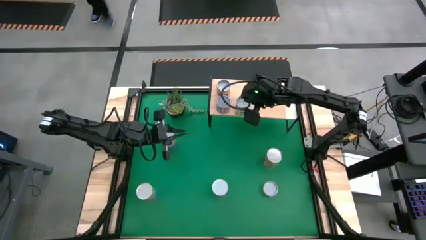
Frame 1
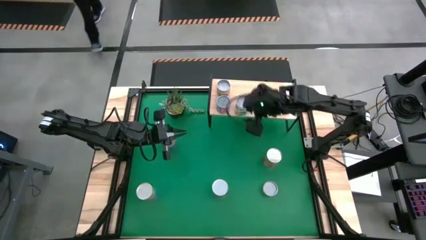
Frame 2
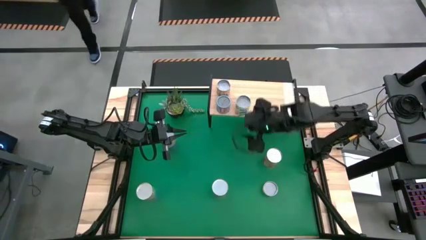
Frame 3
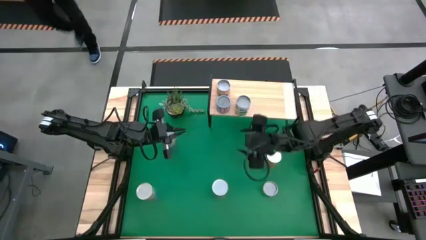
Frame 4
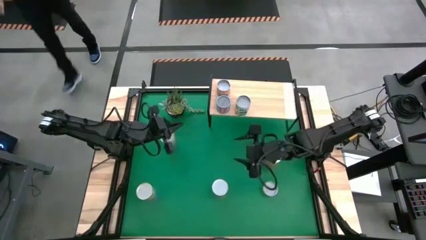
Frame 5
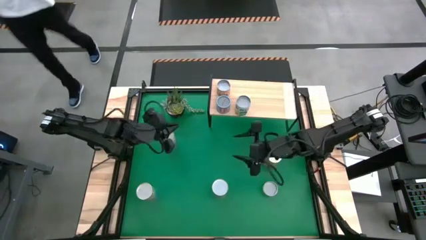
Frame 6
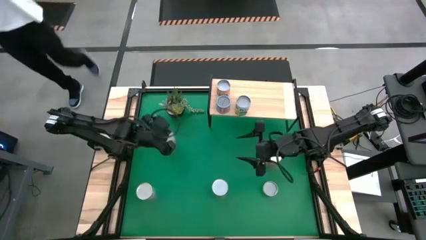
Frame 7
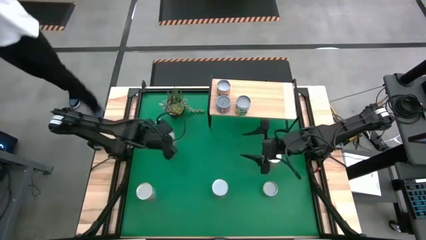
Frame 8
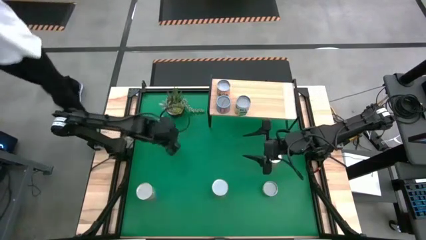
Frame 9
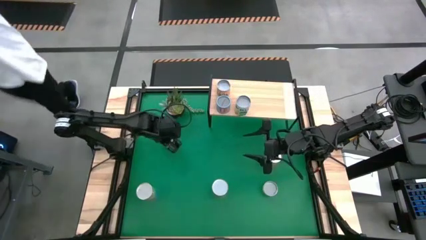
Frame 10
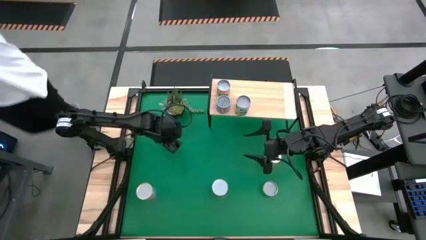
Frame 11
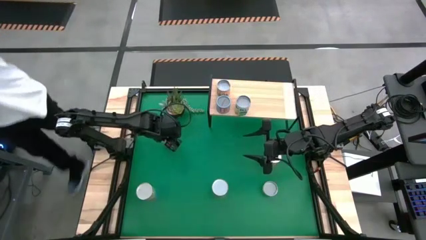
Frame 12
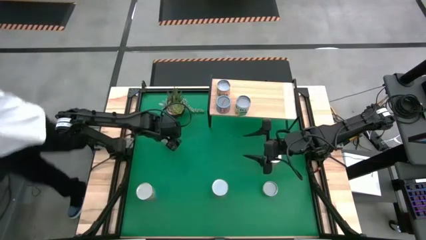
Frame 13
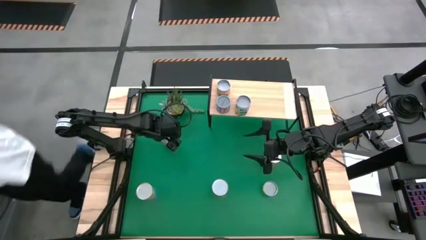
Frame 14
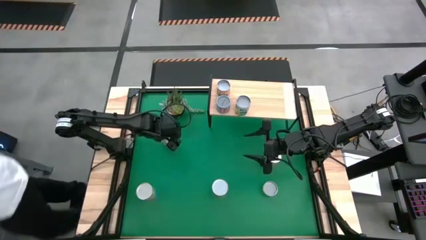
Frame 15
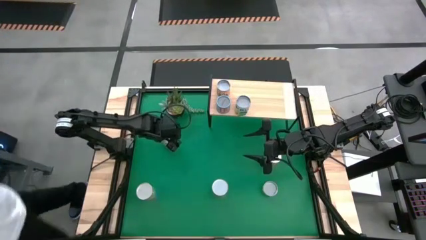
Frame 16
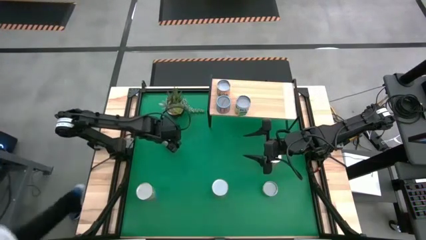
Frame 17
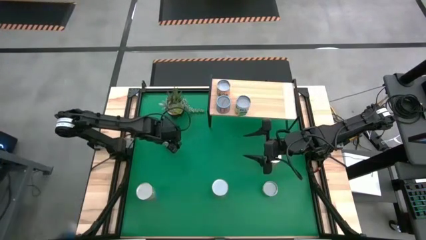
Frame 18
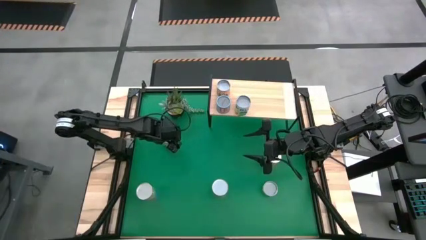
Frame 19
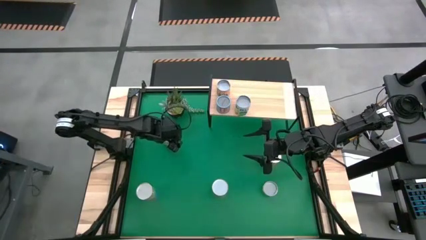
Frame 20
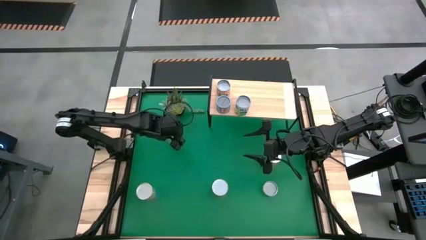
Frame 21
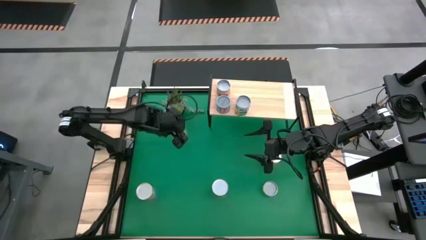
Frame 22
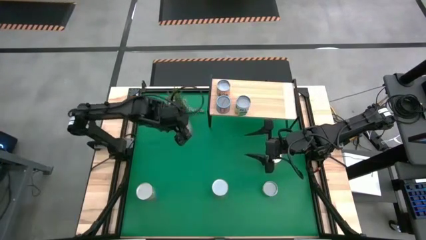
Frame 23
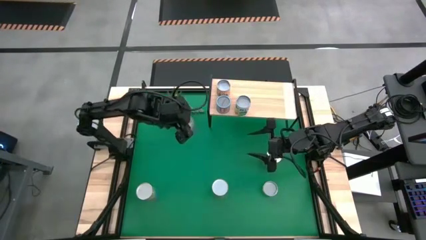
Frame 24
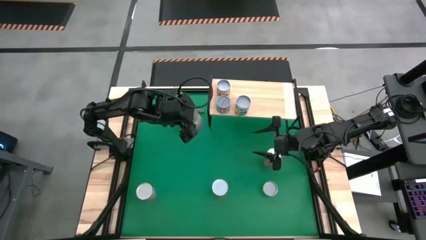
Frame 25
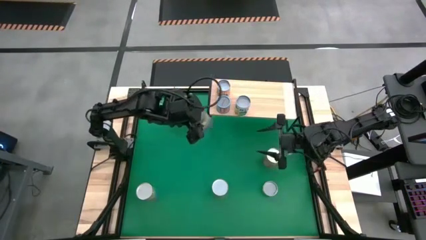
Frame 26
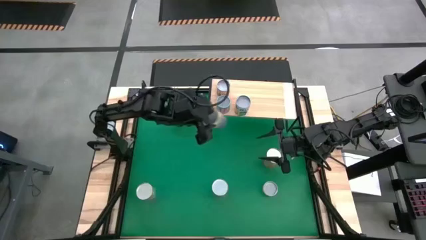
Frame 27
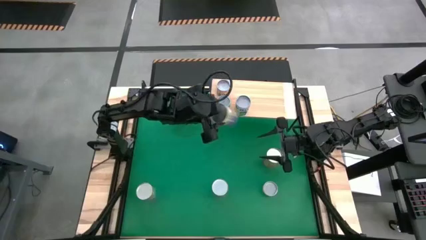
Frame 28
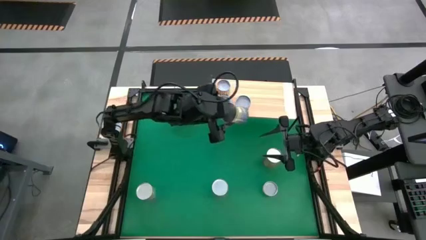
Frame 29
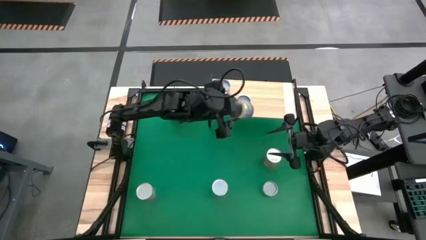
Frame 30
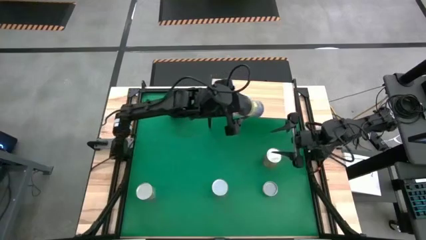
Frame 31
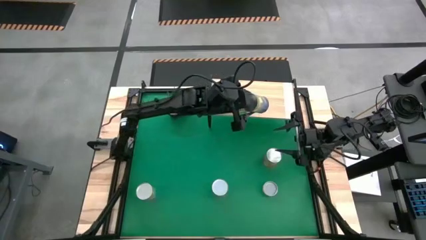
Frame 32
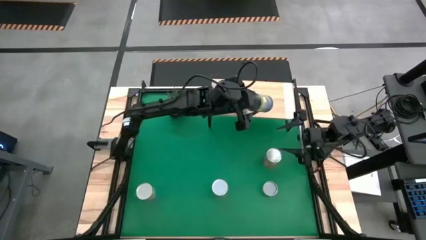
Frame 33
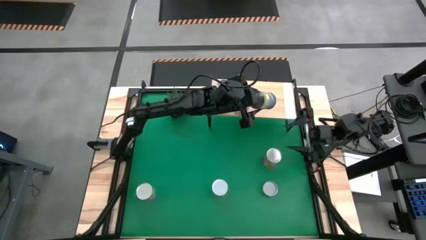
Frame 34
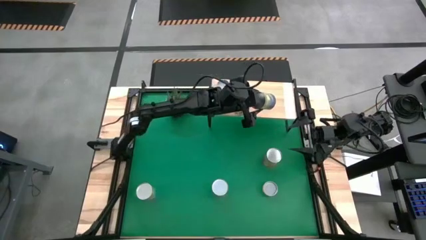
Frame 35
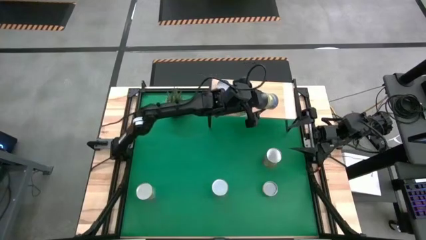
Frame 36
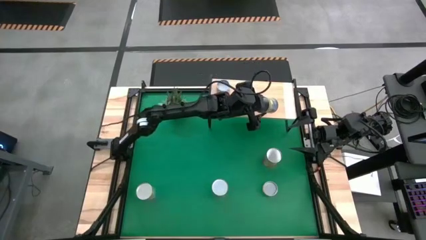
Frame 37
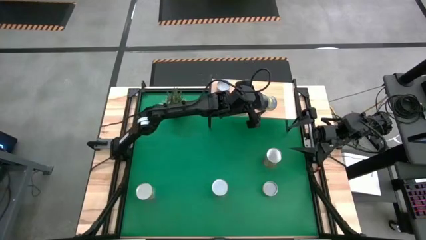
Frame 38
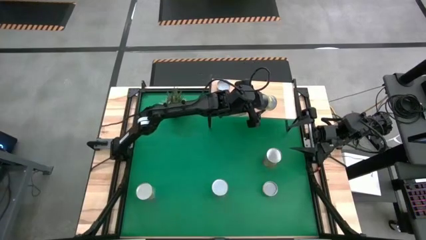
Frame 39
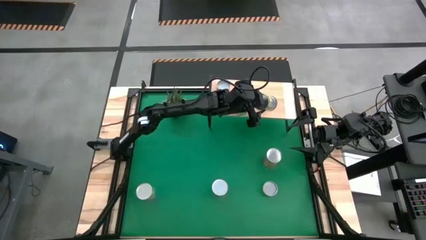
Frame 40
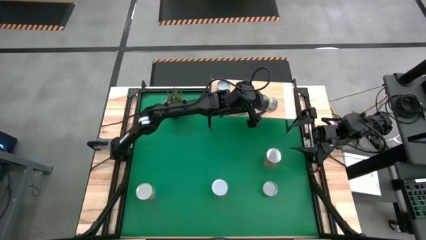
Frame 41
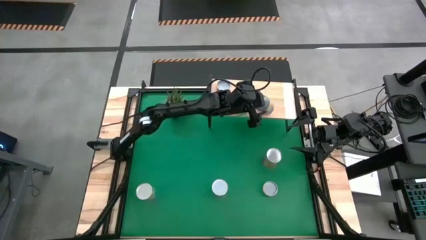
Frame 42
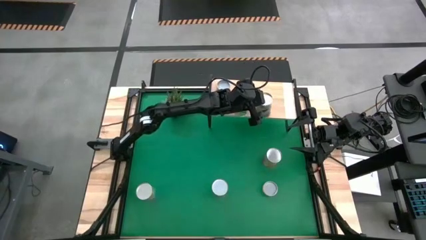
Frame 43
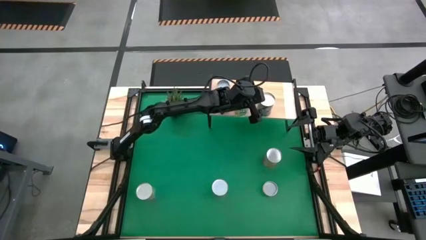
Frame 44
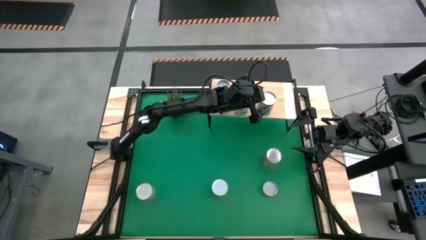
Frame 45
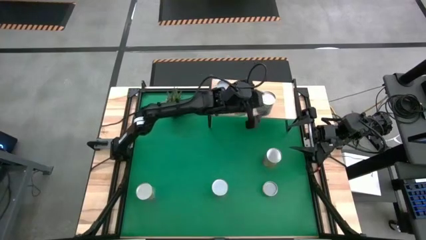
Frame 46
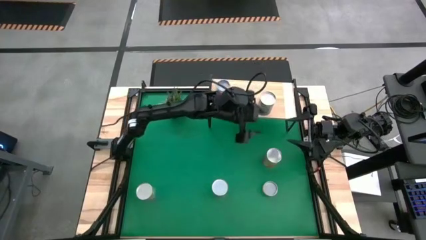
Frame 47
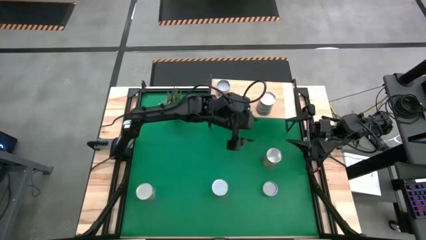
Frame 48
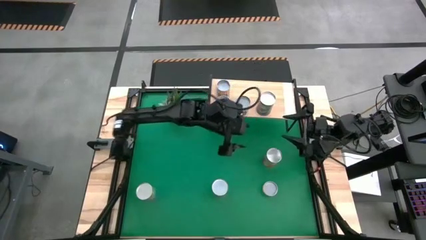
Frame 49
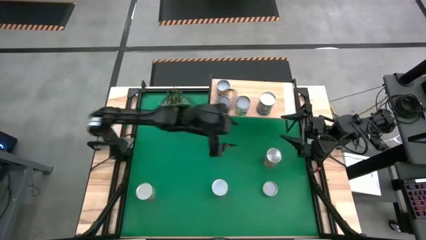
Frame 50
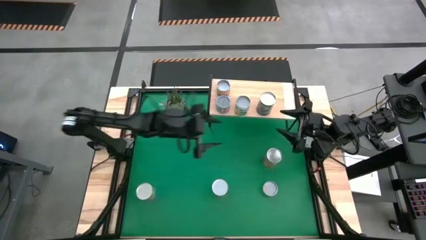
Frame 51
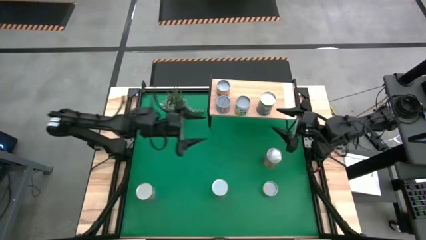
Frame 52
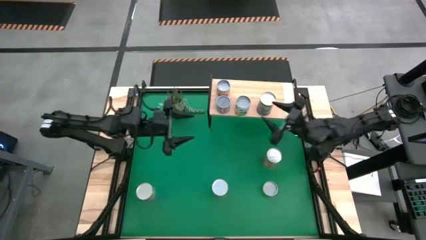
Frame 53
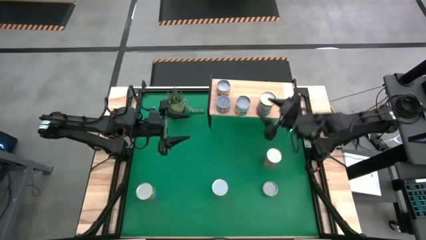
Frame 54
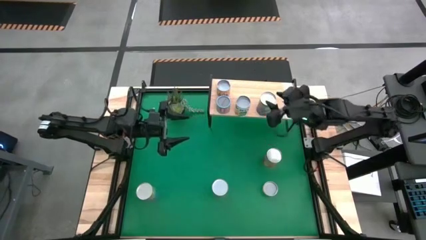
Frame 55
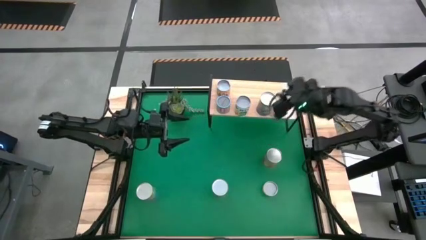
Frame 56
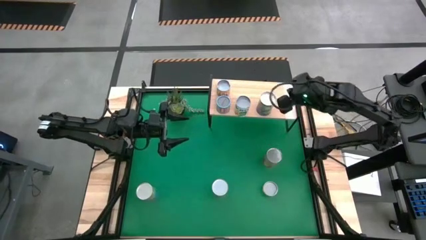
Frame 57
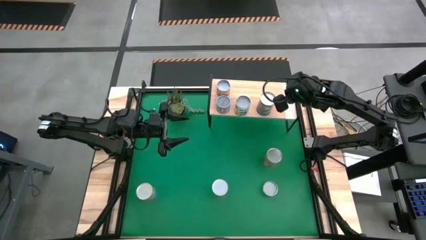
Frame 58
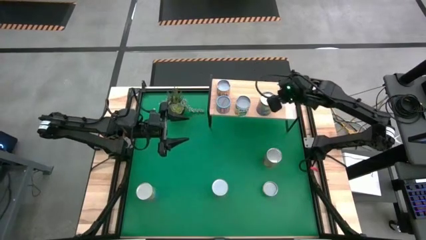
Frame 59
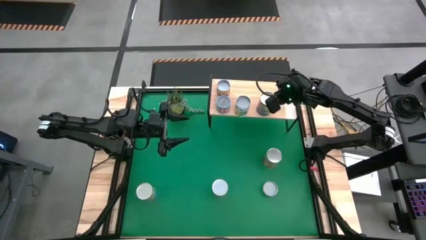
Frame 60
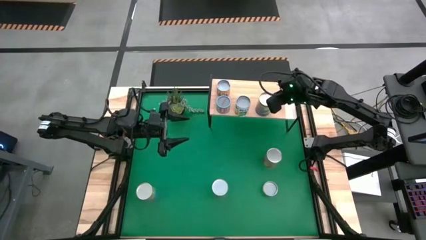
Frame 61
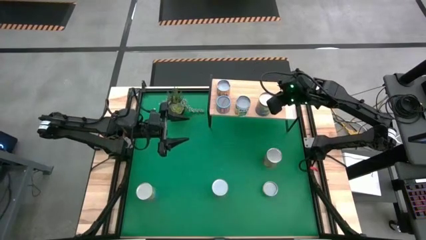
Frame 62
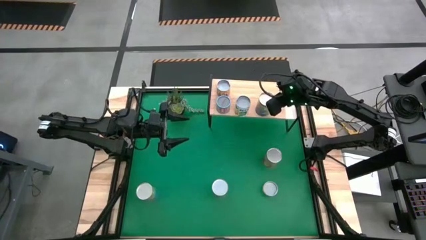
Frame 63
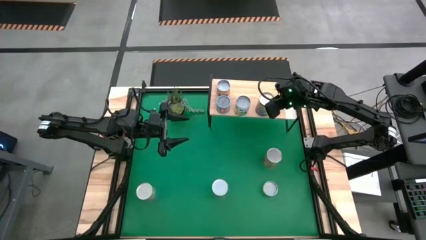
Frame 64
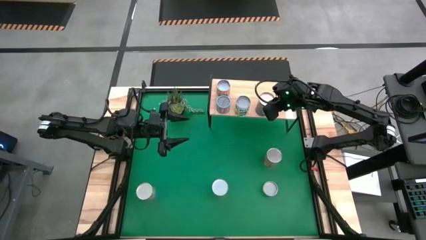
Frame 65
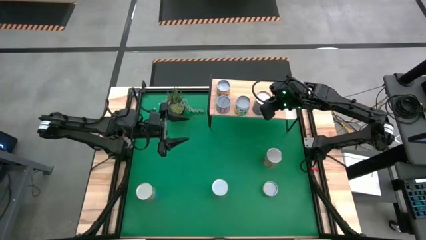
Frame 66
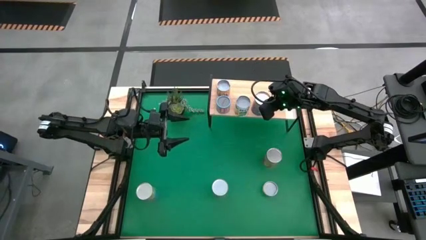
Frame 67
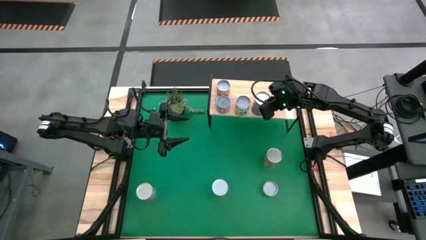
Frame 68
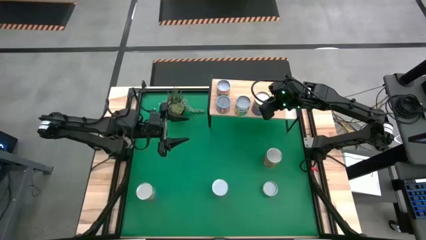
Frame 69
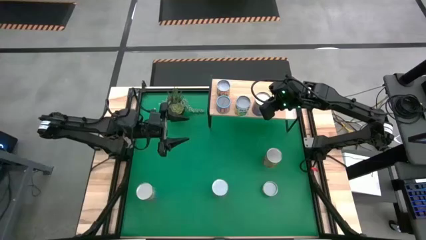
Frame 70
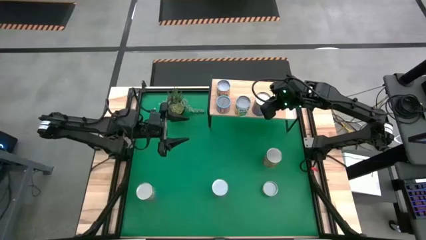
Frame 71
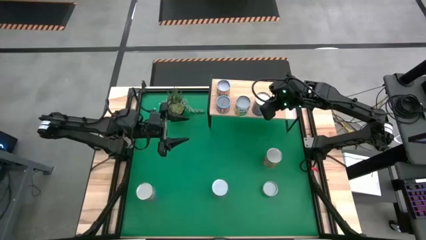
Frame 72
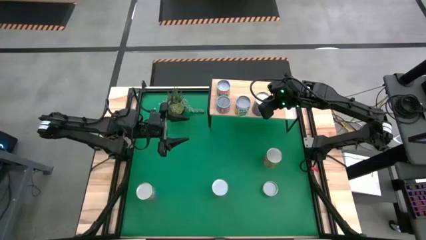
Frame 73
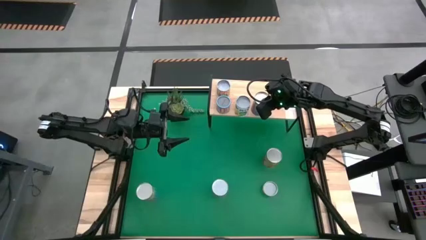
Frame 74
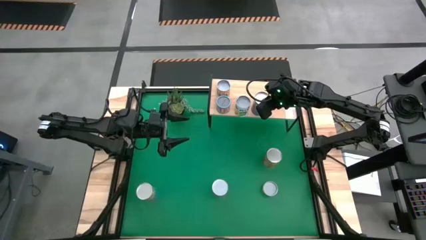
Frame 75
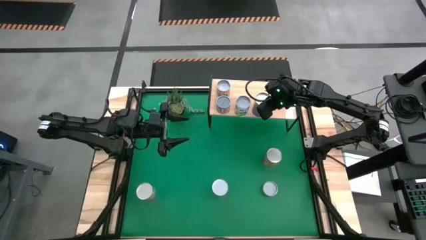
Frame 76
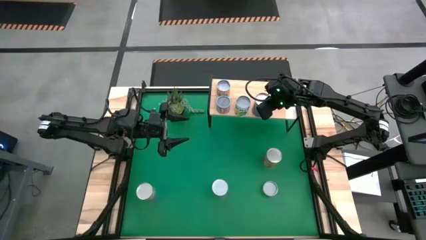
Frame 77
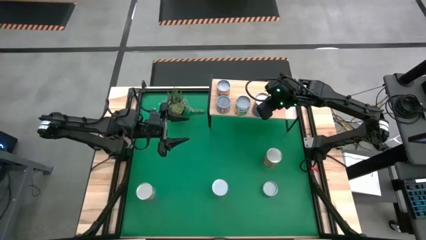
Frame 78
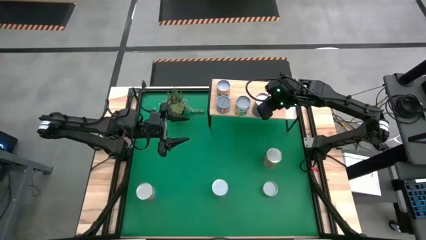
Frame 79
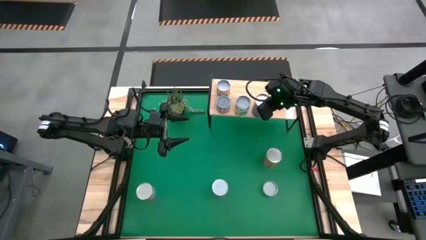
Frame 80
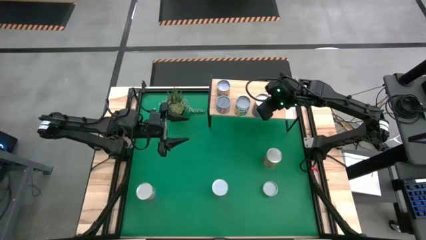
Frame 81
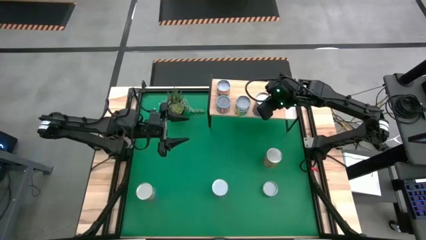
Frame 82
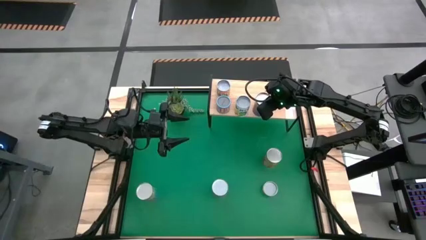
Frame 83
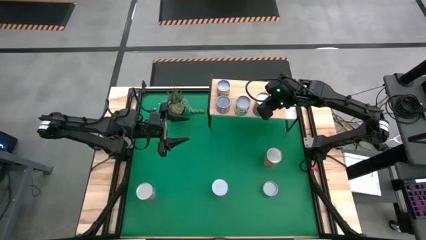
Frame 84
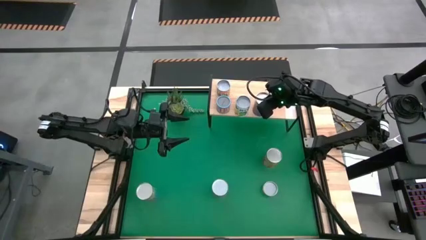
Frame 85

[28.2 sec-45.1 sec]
Task: Pick and place cans onto a shelf
Put the canned peas on the shelf
